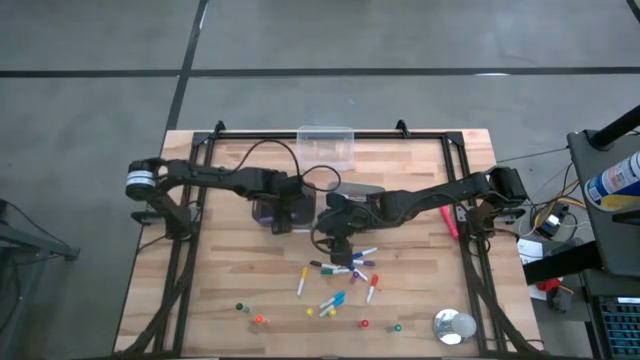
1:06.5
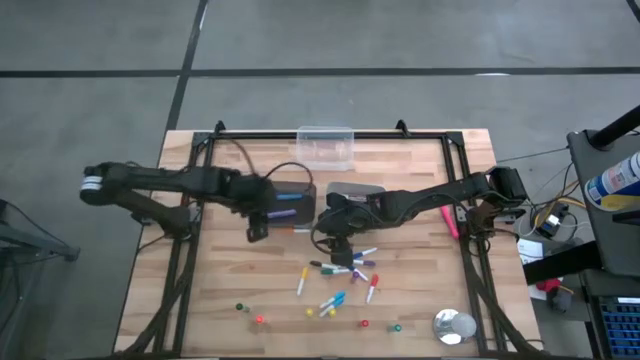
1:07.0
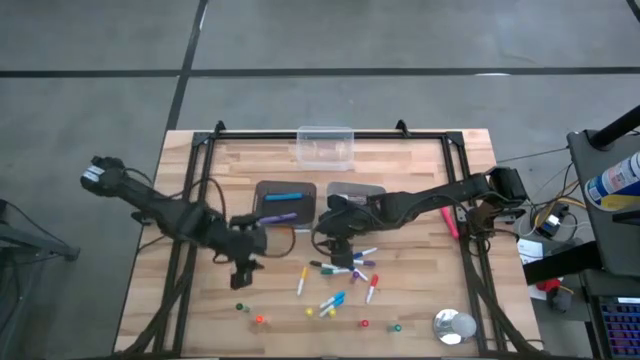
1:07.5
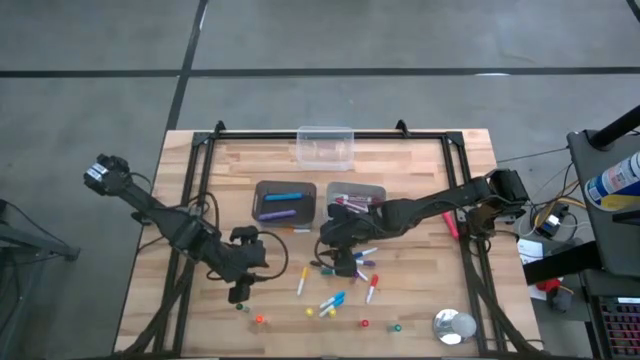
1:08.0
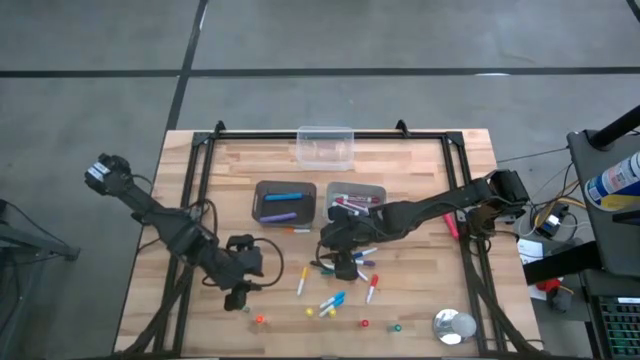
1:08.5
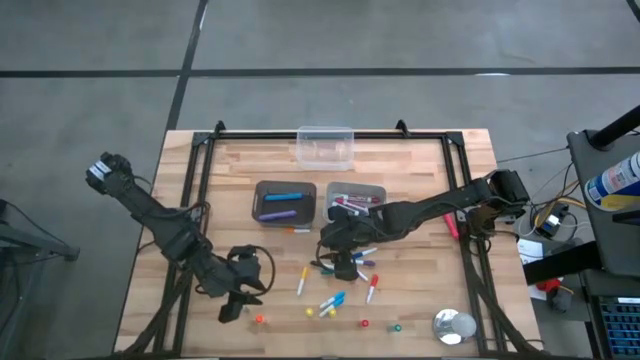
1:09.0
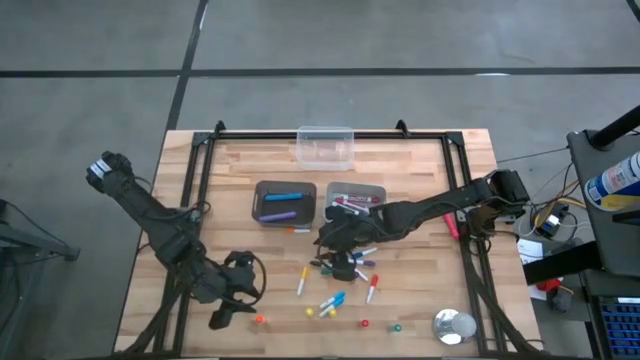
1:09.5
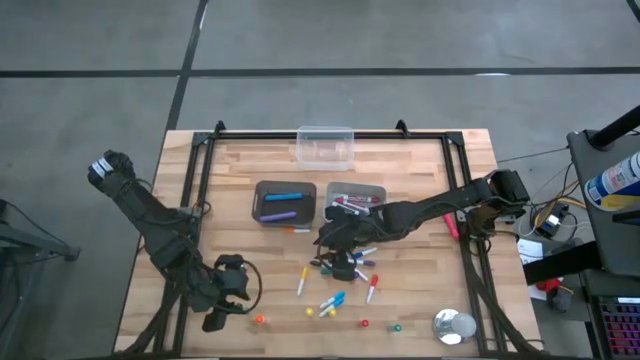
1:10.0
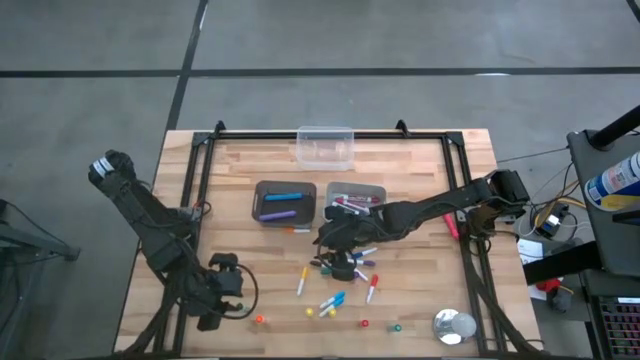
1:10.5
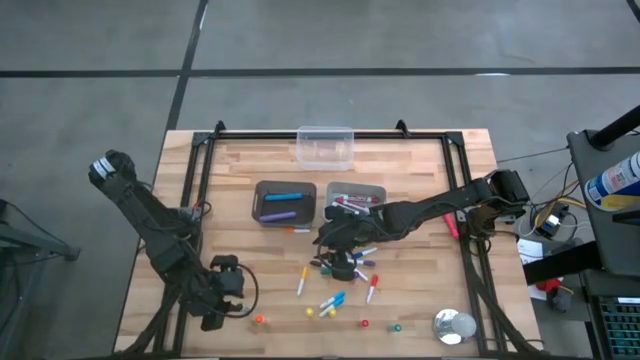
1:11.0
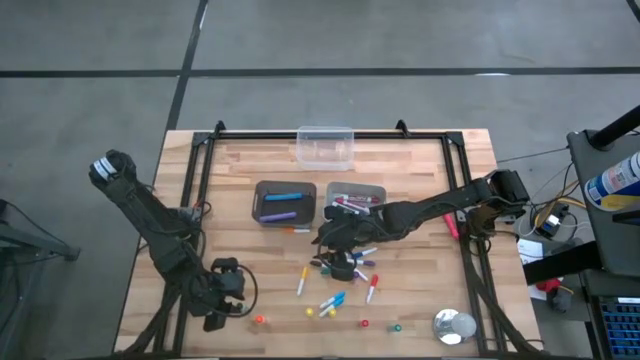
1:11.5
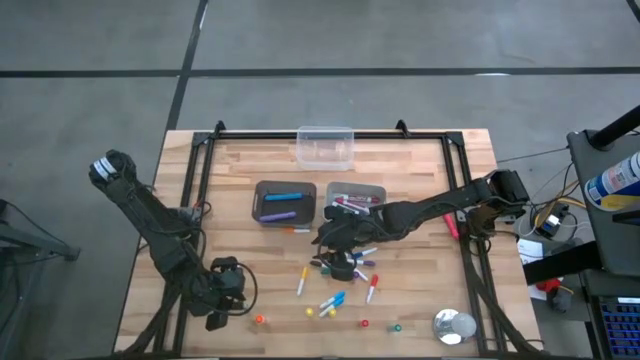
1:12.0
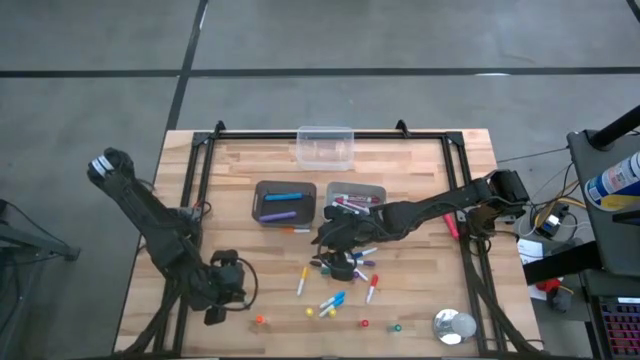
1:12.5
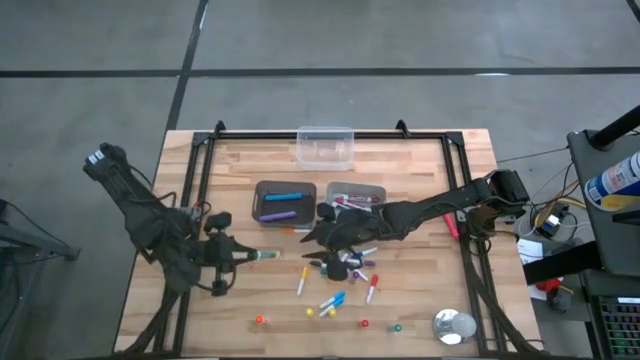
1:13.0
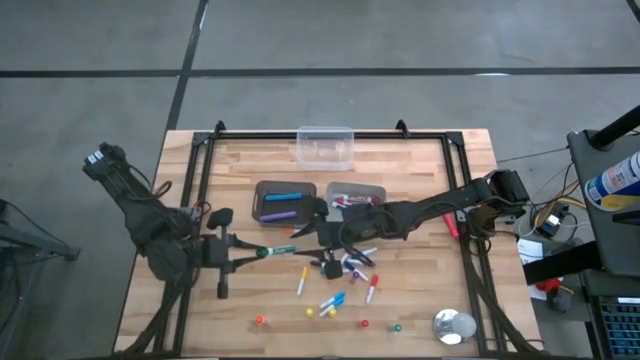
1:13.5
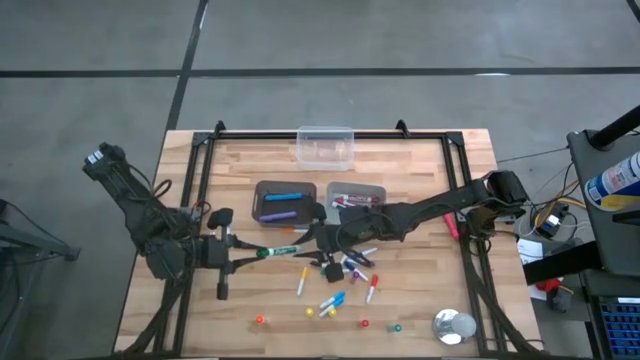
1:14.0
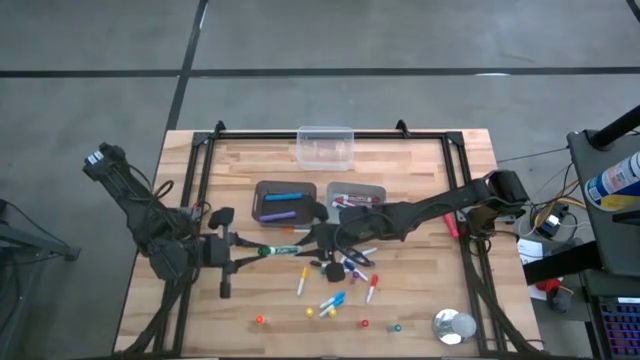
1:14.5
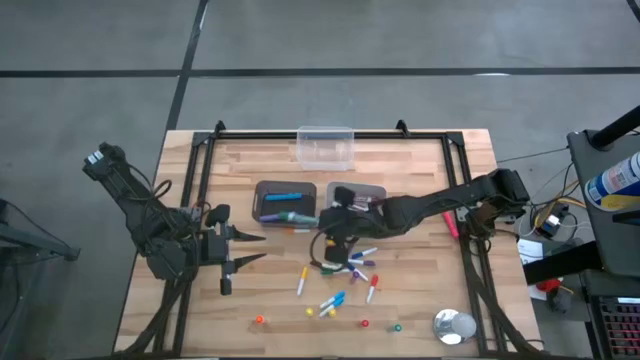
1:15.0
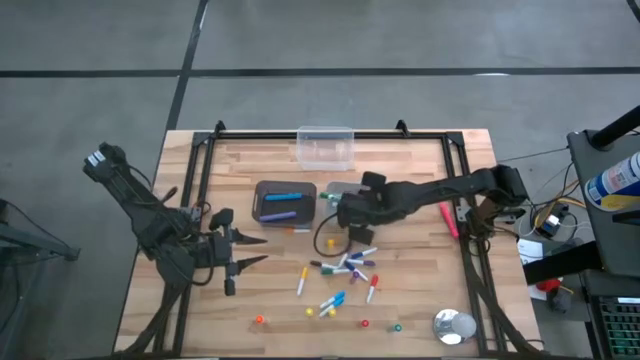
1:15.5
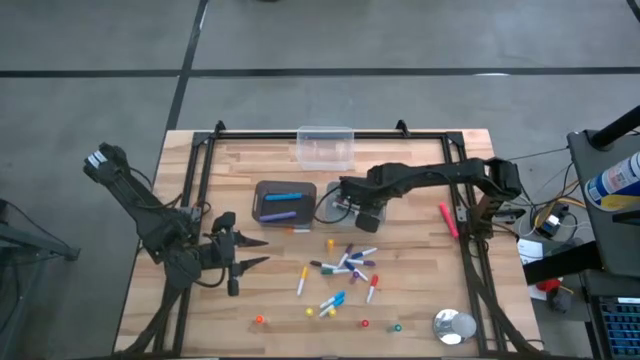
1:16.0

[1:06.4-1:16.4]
Task: Pick & Place Markers
Put the large green marker pen into the white bin

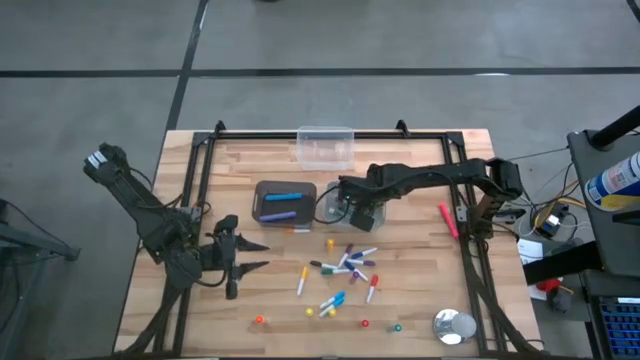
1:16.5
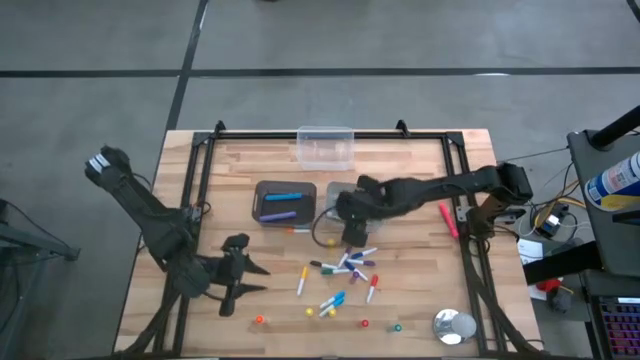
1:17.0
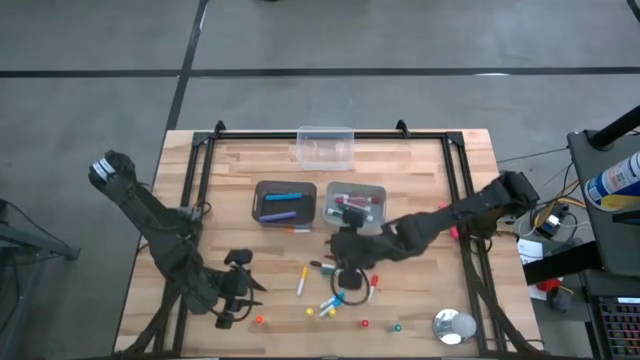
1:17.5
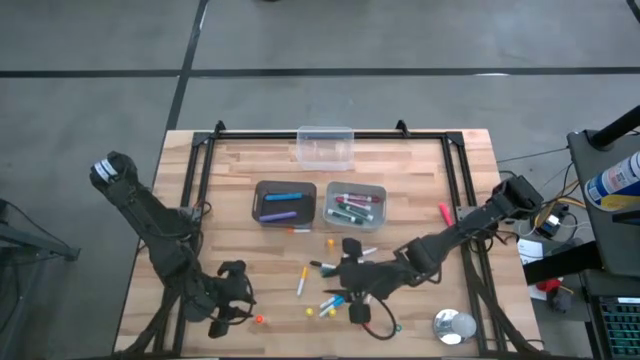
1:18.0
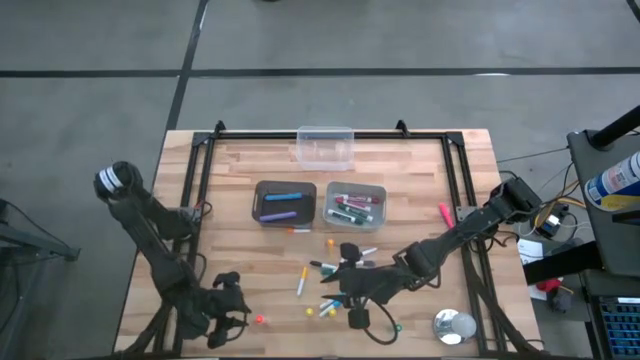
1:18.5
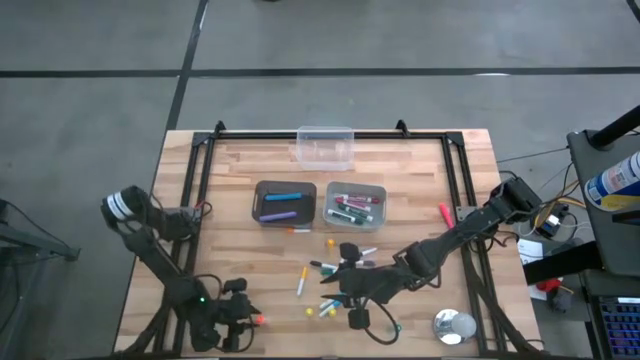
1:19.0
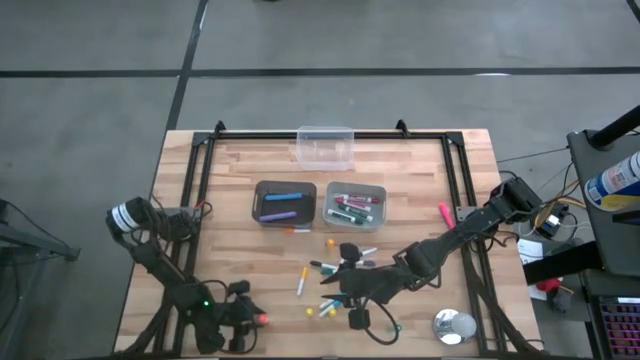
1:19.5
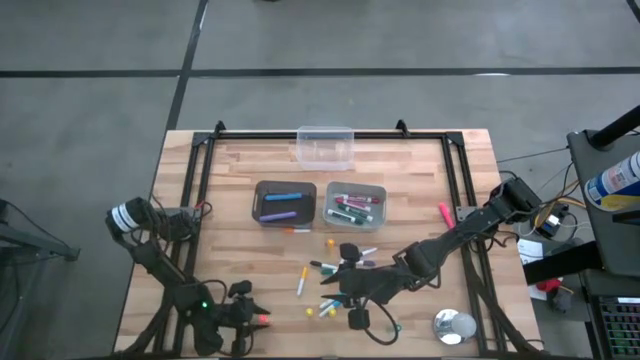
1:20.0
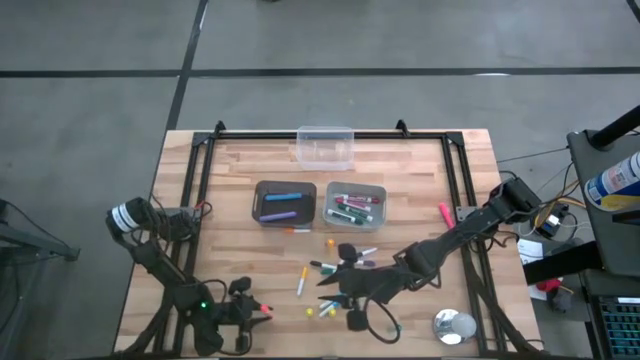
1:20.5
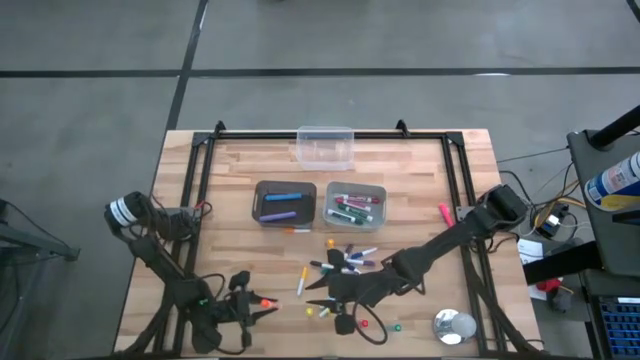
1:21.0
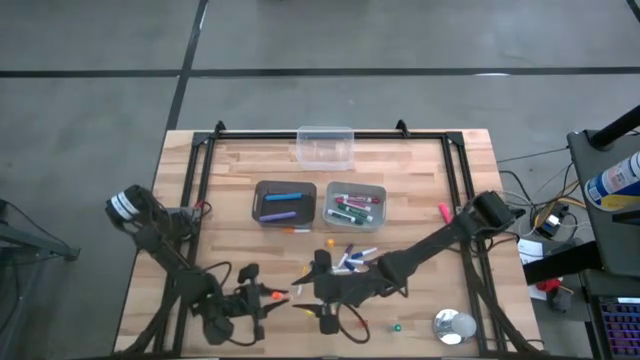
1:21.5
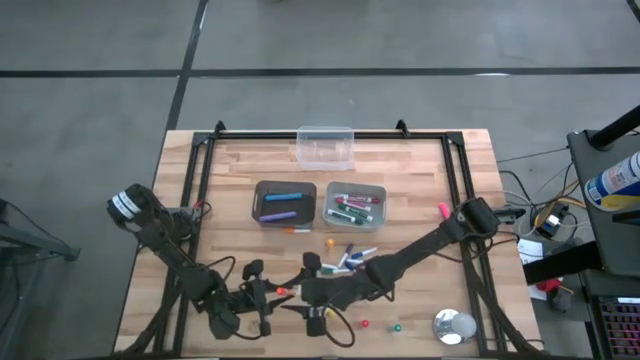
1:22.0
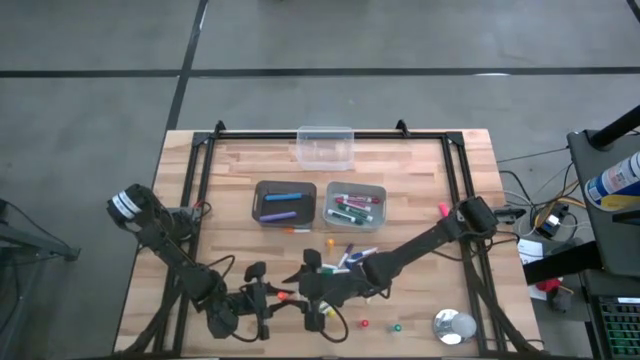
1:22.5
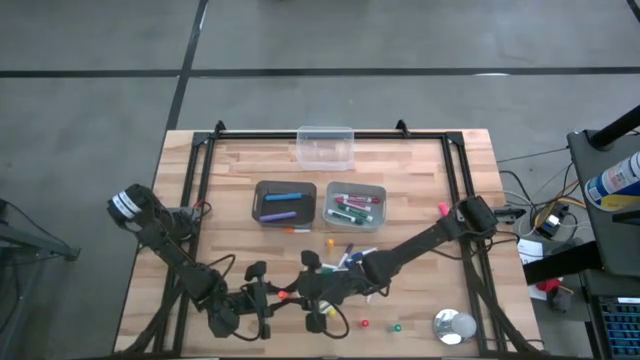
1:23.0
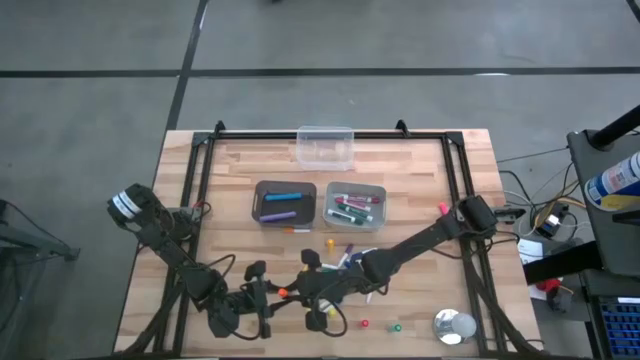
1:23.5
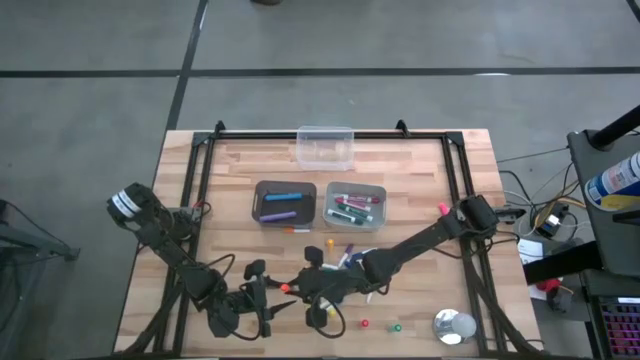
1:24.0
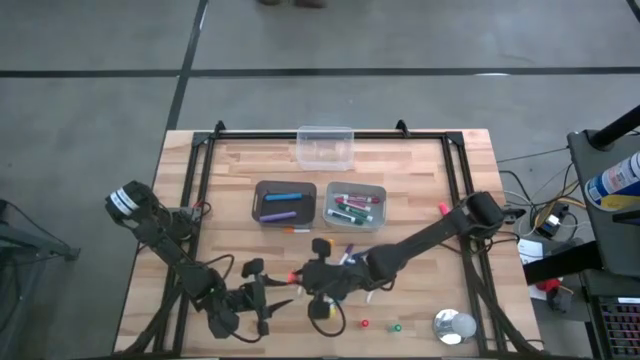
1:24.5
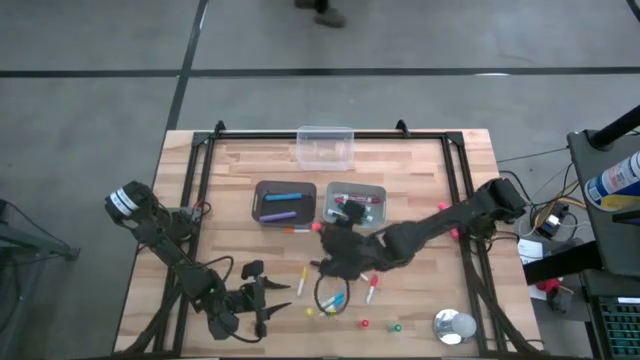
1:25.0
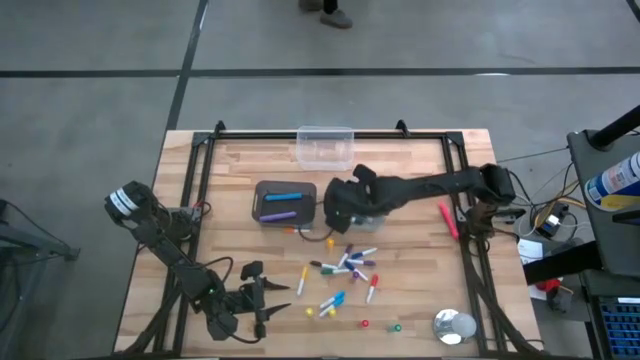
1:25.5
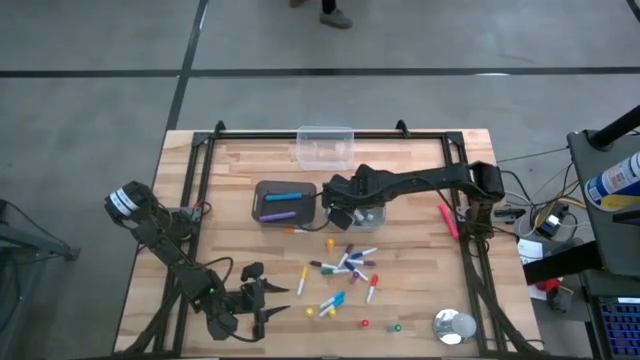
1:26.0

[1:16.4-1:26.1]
Put the large orange marker pen into the white bin

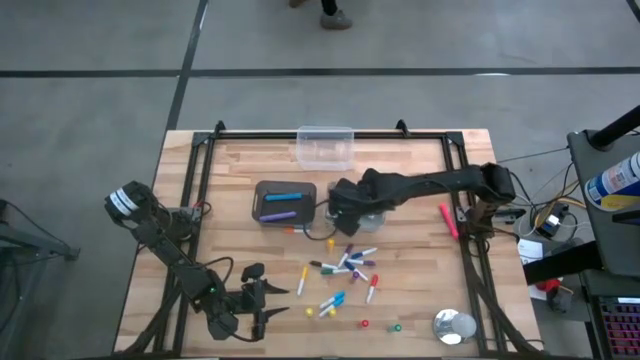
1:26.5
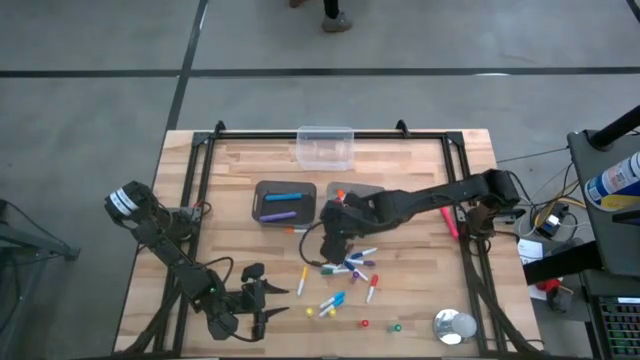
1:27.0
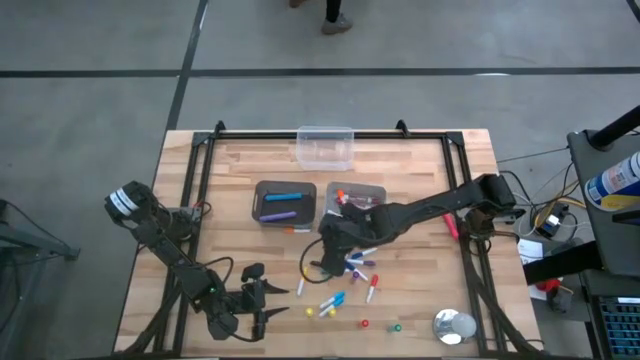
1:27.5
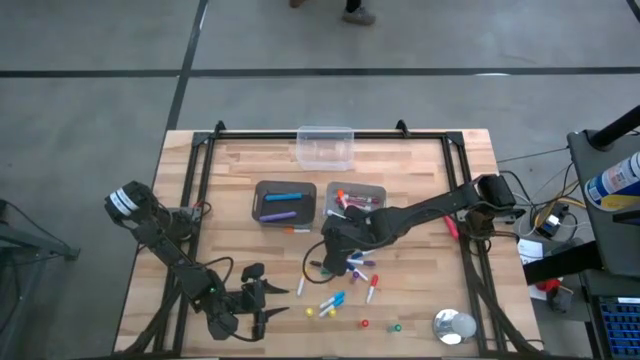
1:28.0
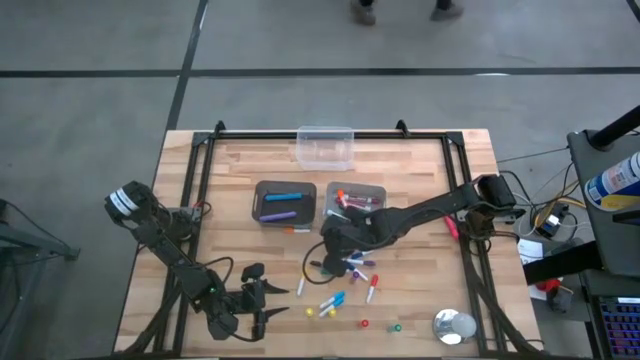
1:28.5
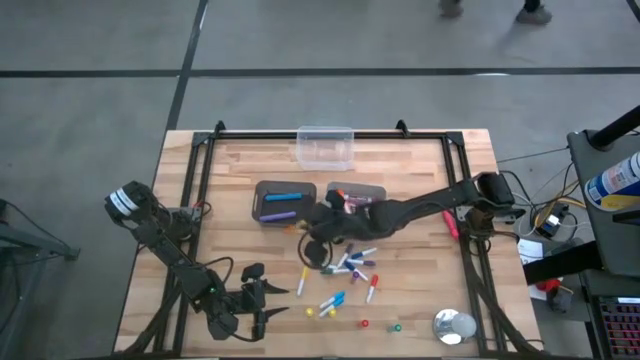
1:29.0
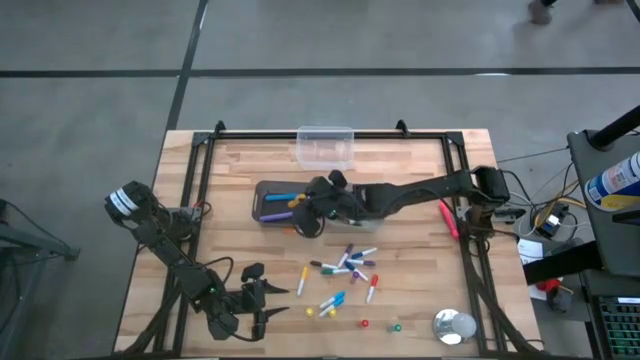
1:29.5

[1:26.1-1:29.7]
Put the large dark yellow highlighter pen into the black bin
